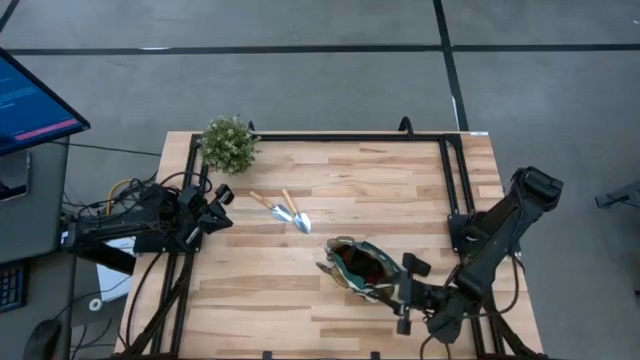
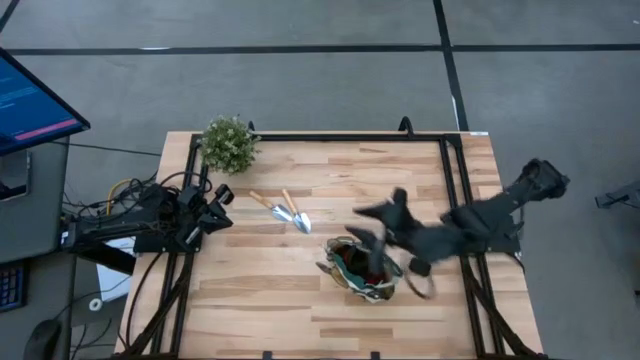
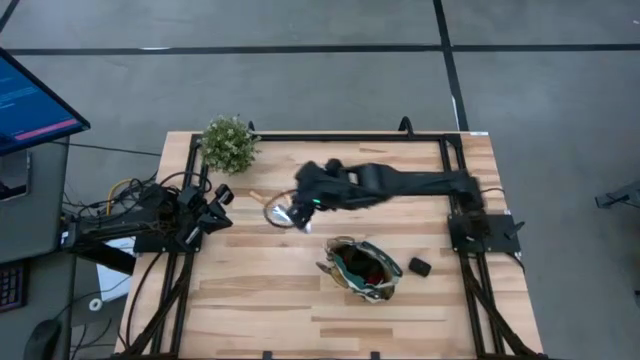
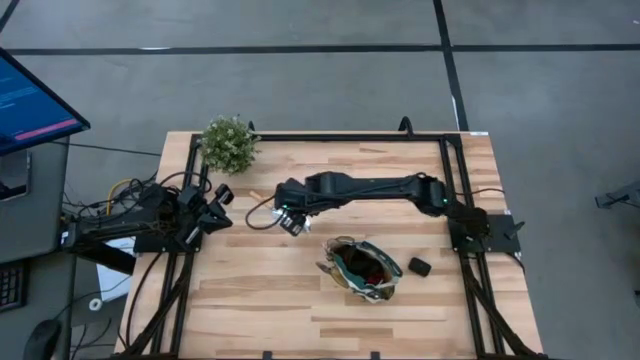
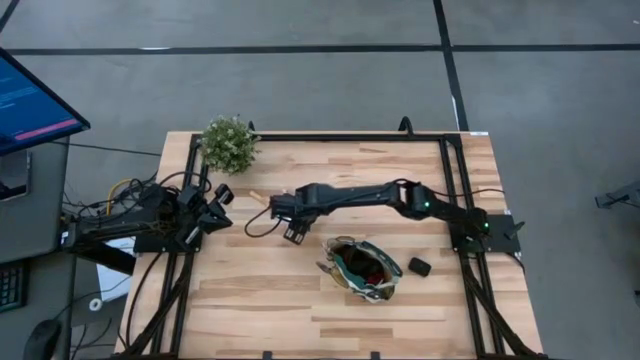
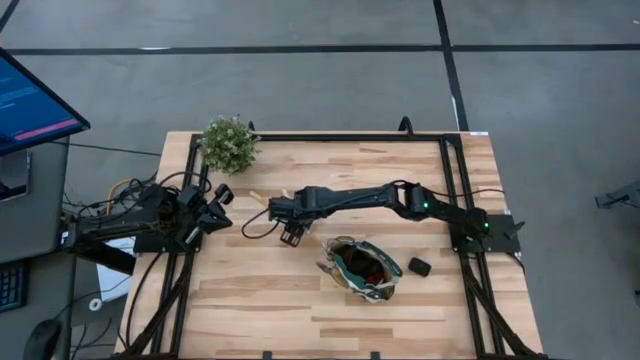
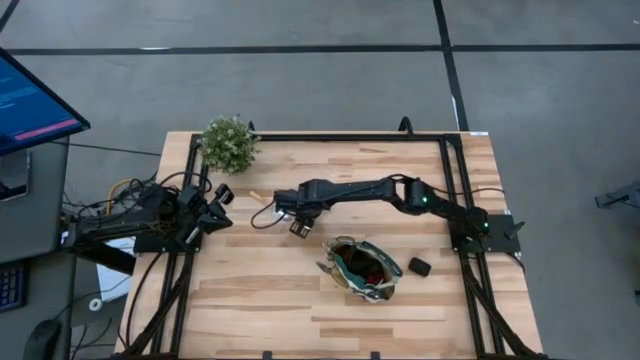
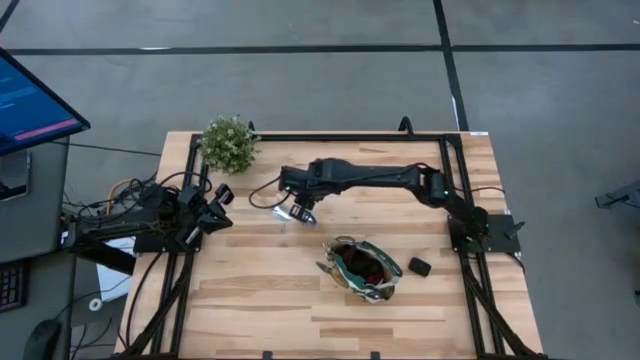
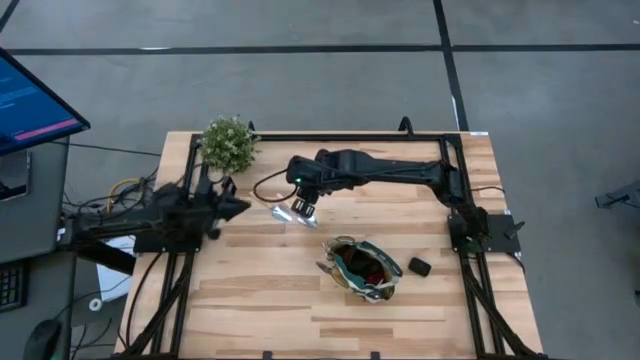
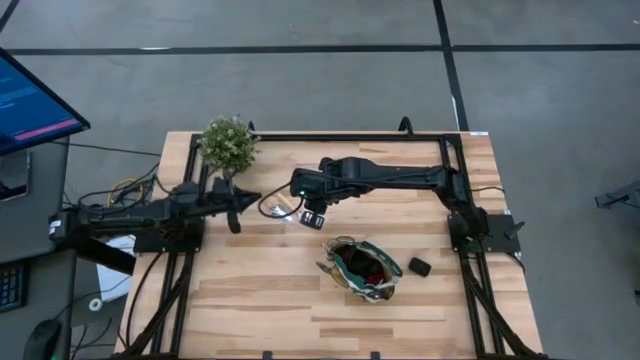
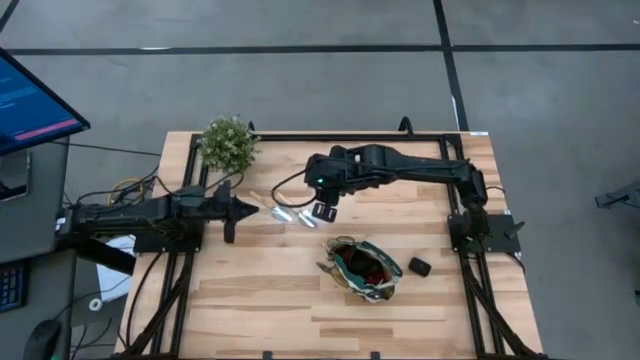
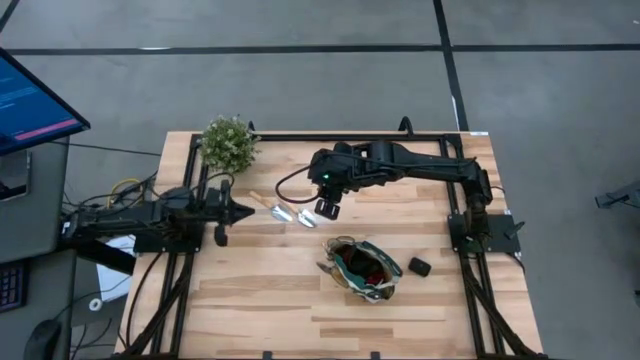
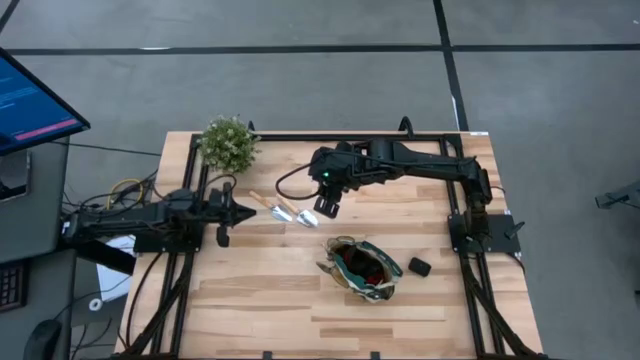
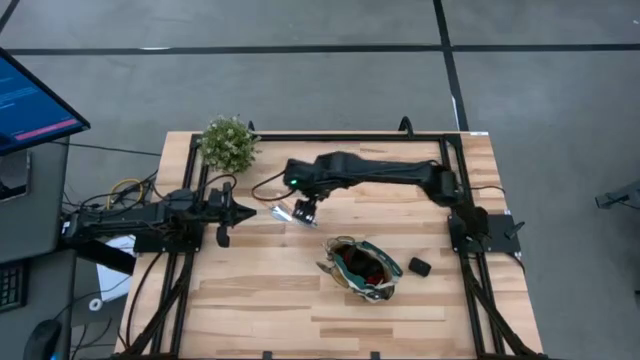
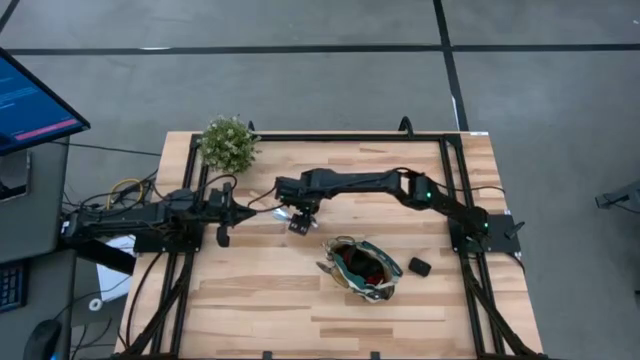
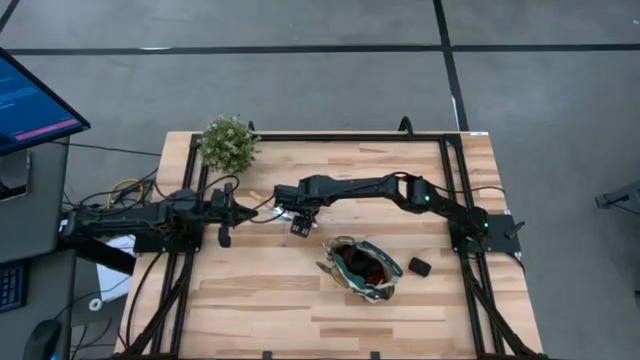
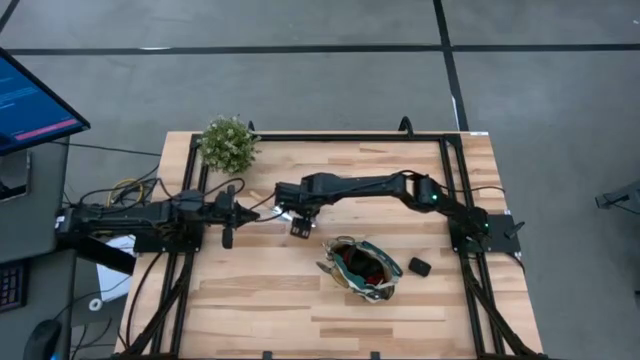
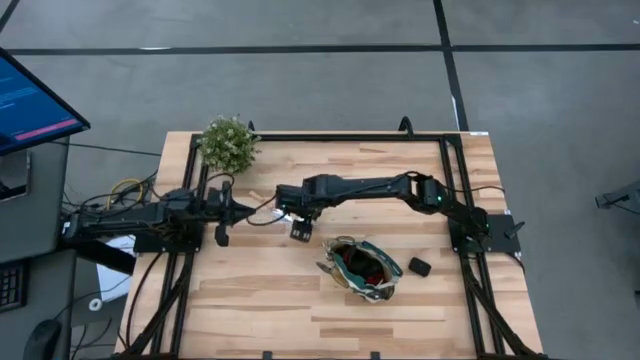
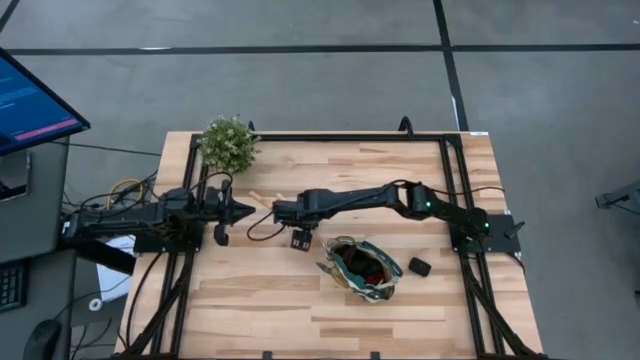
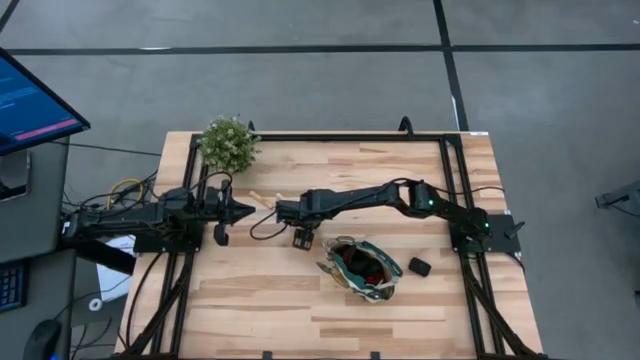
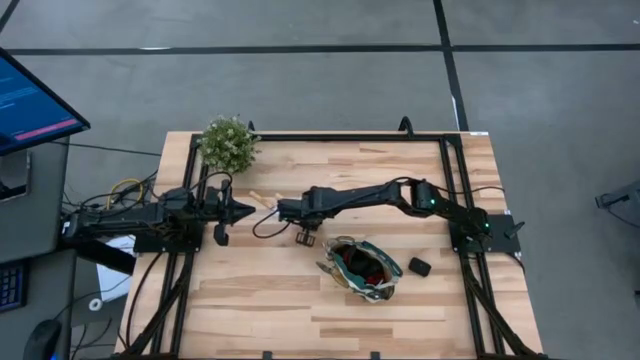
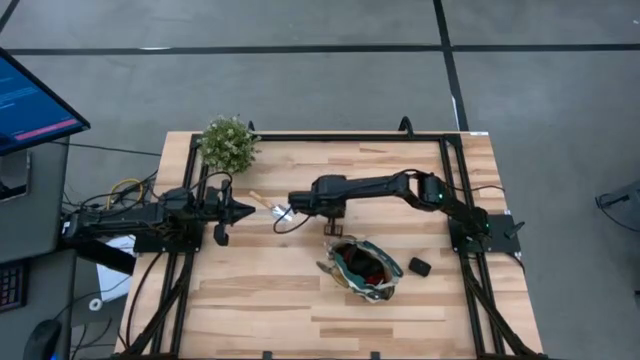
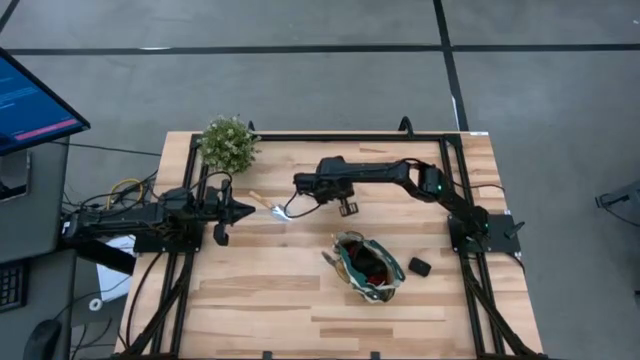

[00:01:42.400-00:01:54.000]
Task: Pick & Place Garden tools in Gardening bag
Put the brown trowel into the gardening bag

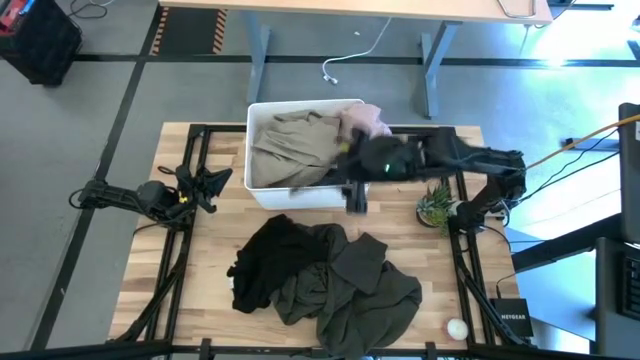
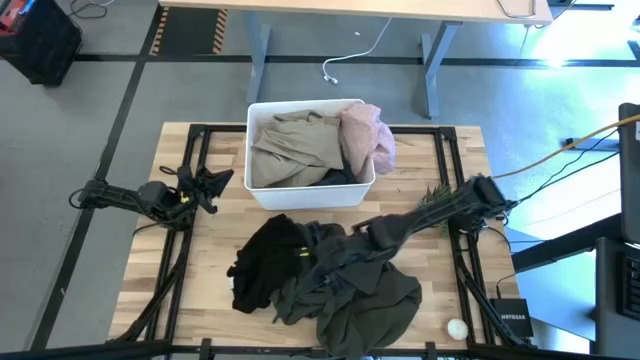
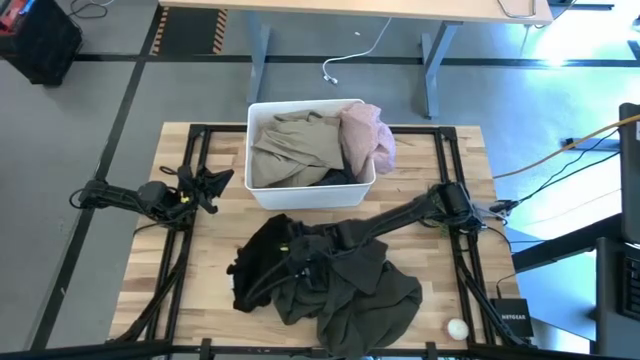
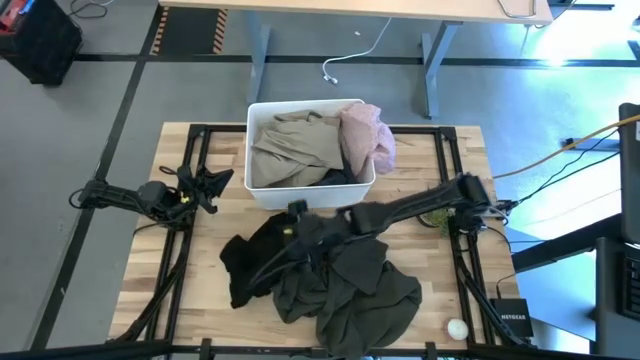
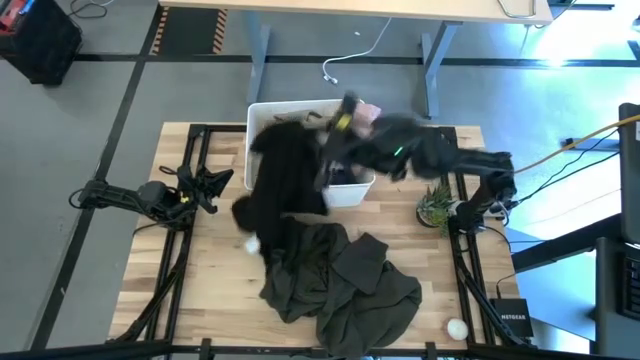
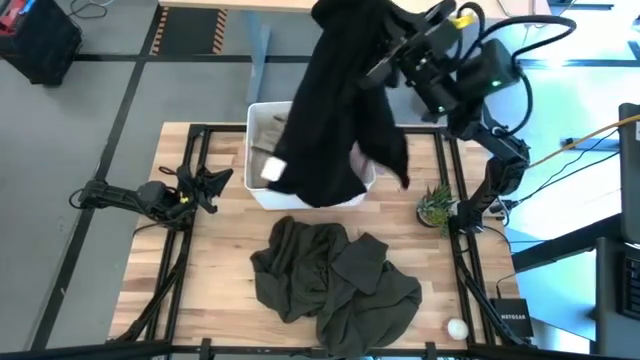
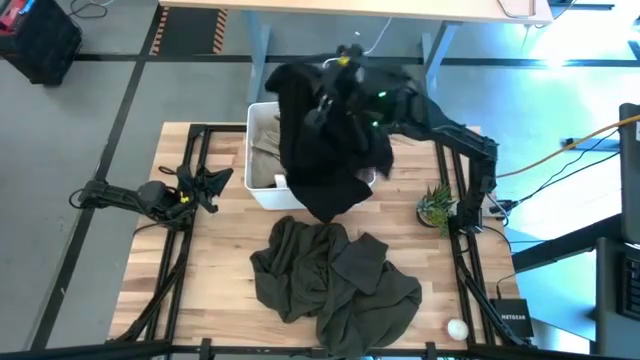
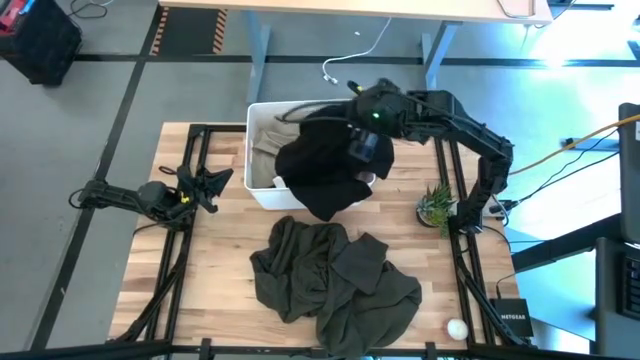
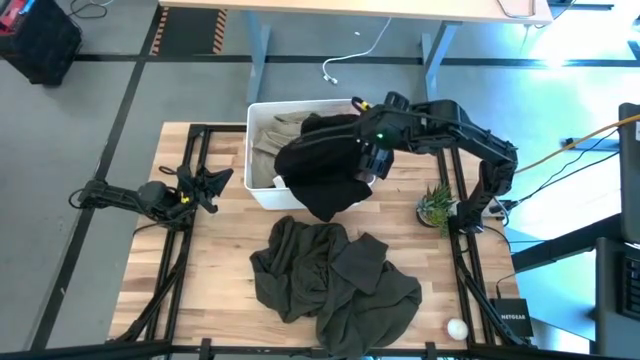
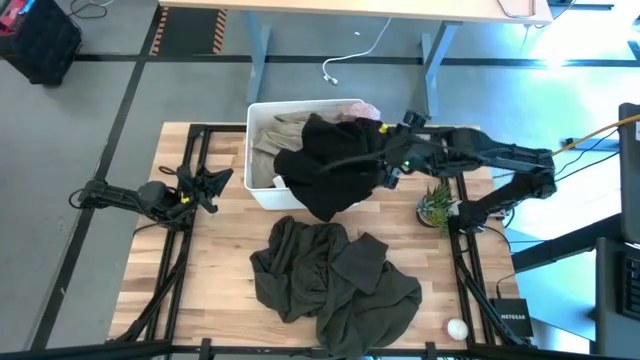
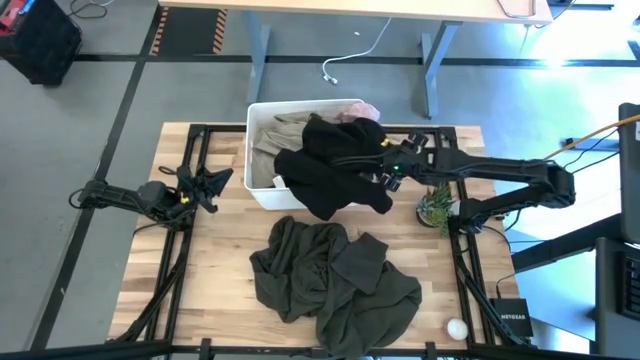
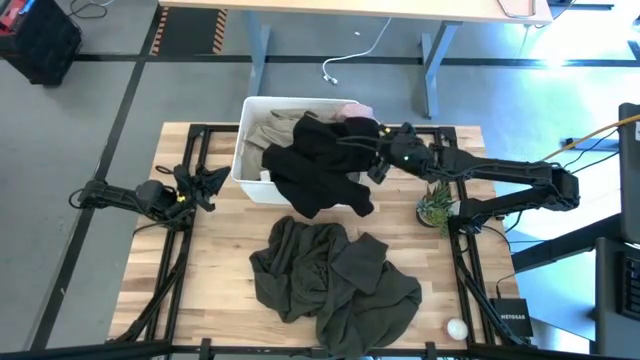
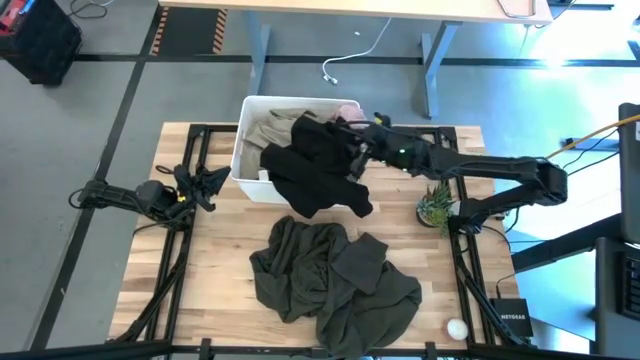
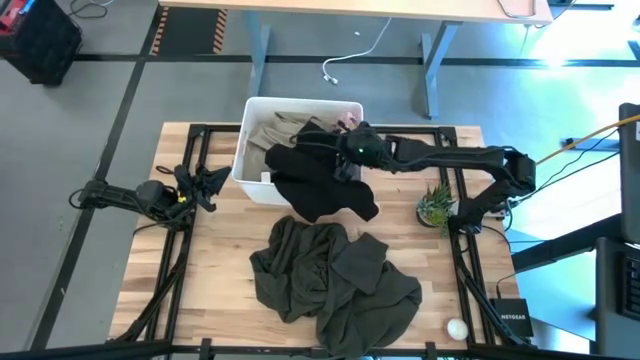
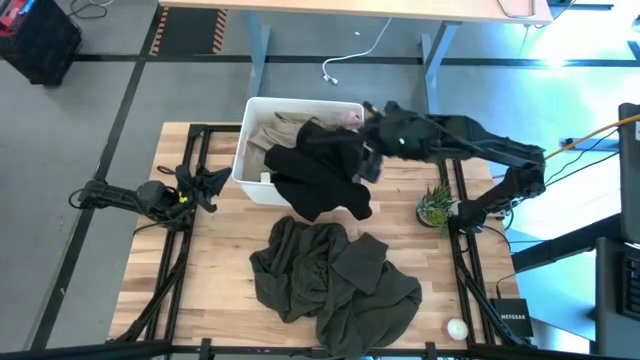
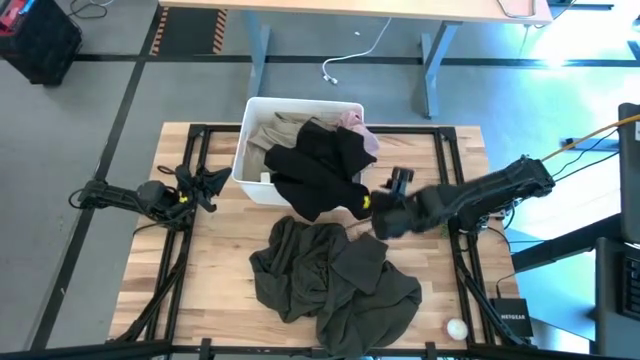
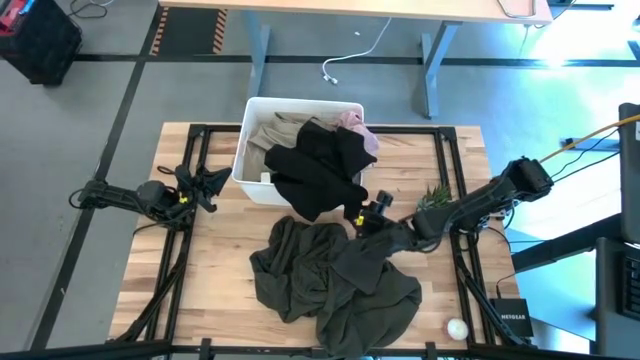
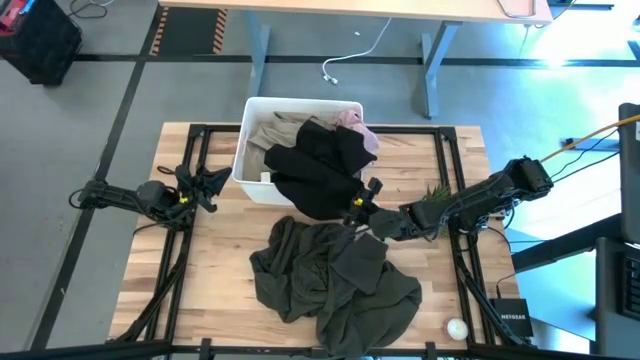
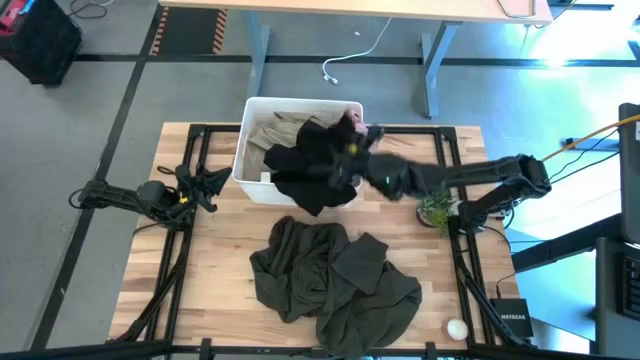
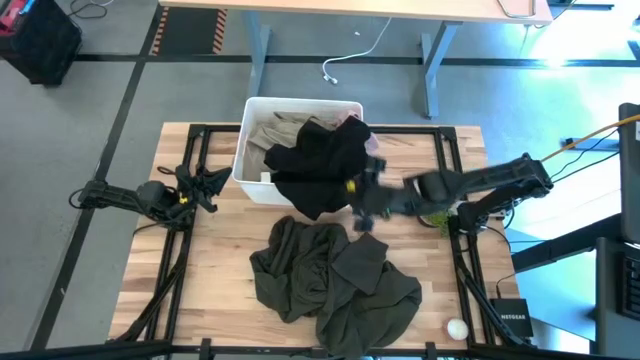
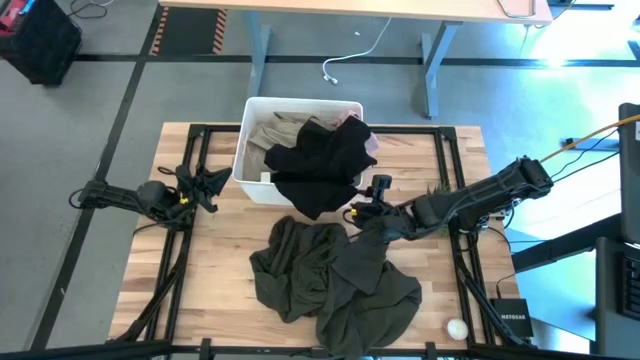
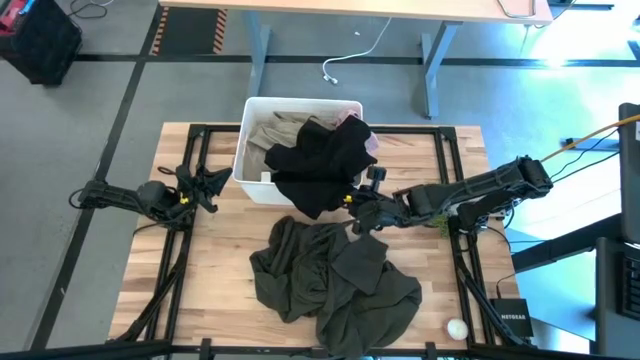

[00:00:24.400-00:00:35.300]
Task: Sort clothes
Put the black shirt into the white bin
